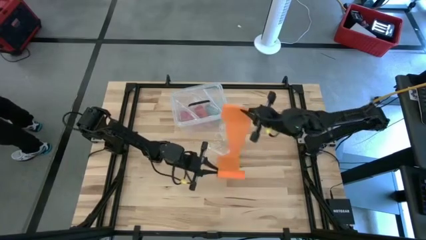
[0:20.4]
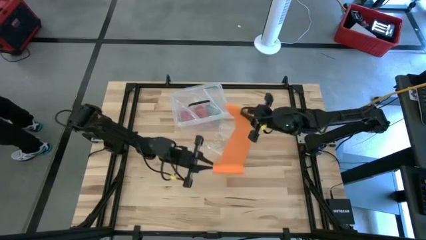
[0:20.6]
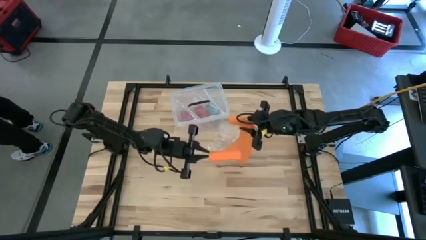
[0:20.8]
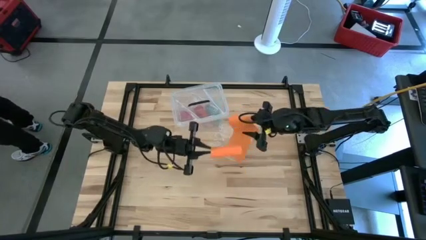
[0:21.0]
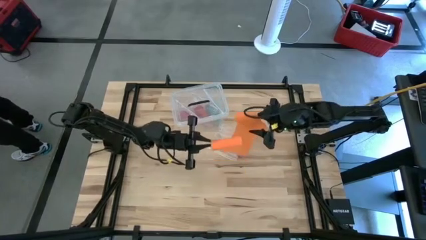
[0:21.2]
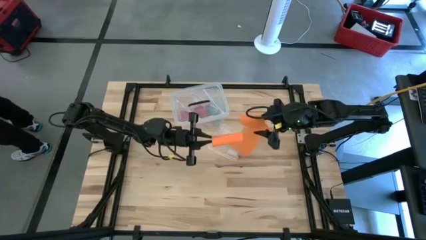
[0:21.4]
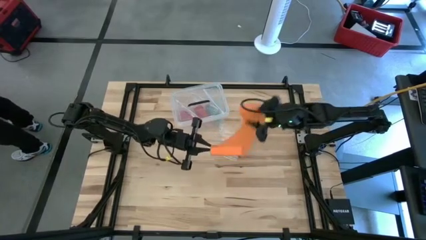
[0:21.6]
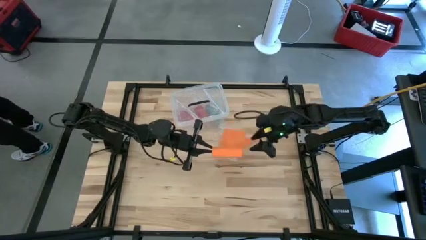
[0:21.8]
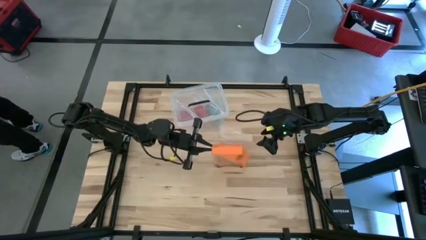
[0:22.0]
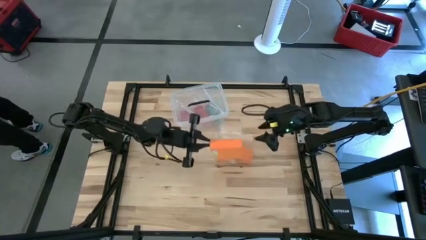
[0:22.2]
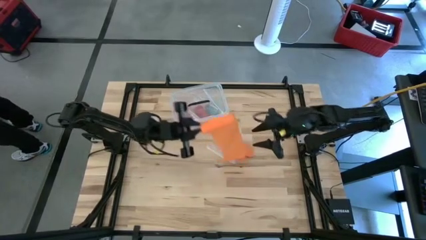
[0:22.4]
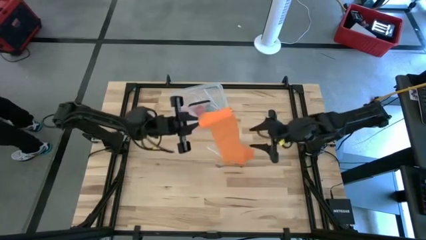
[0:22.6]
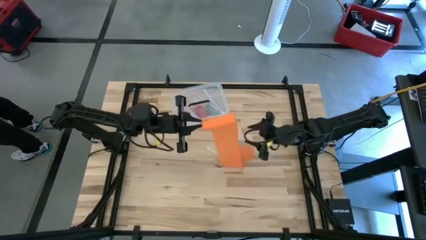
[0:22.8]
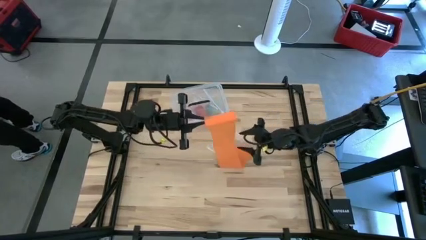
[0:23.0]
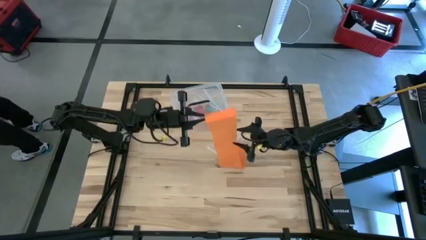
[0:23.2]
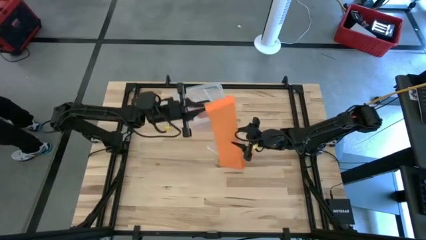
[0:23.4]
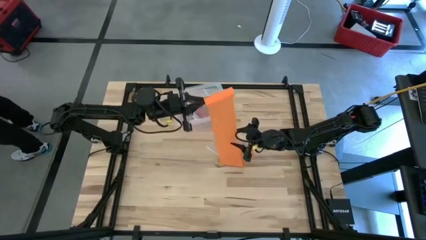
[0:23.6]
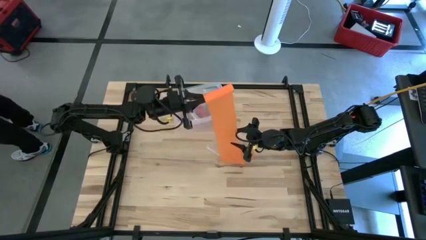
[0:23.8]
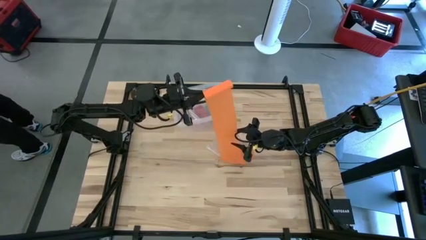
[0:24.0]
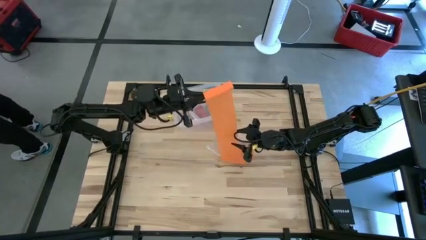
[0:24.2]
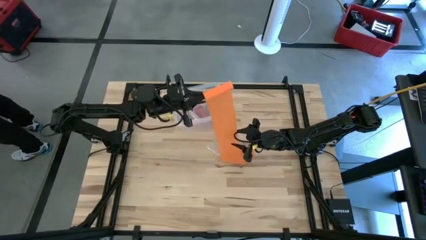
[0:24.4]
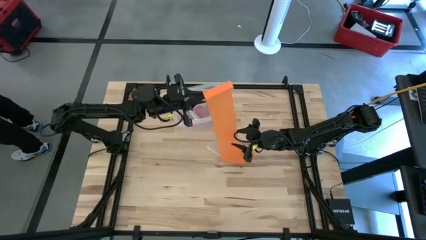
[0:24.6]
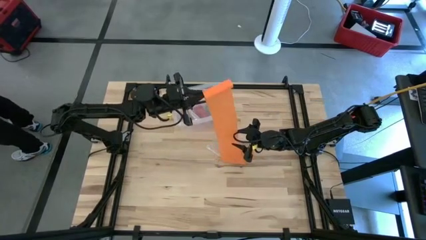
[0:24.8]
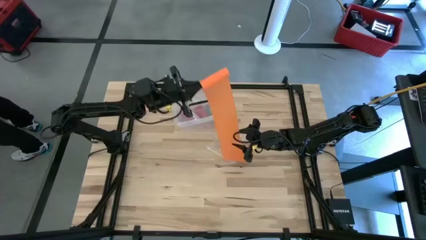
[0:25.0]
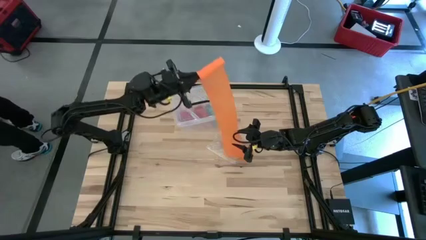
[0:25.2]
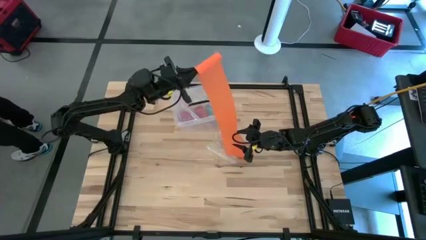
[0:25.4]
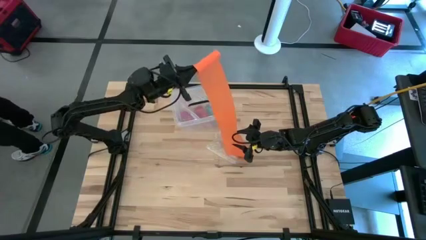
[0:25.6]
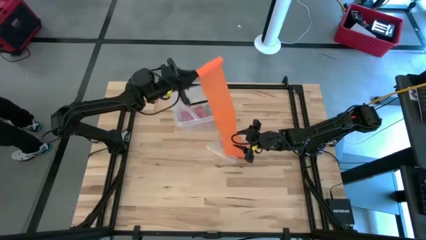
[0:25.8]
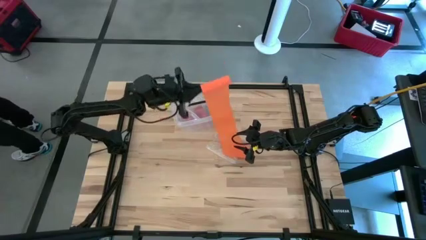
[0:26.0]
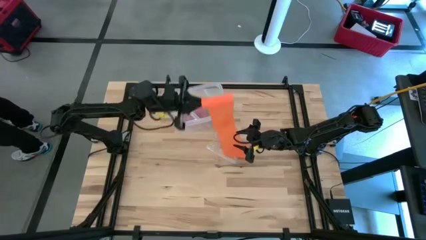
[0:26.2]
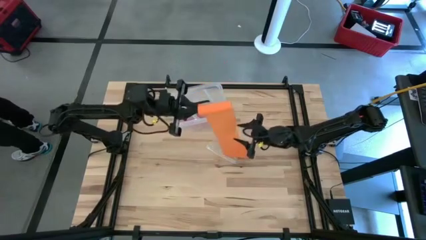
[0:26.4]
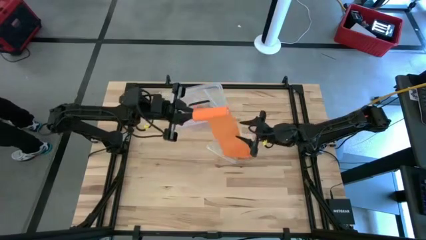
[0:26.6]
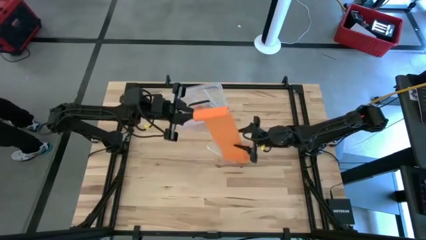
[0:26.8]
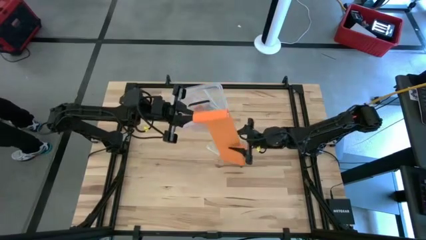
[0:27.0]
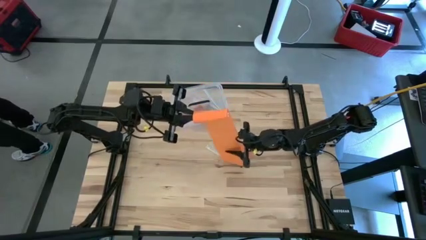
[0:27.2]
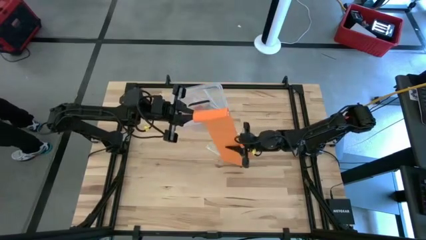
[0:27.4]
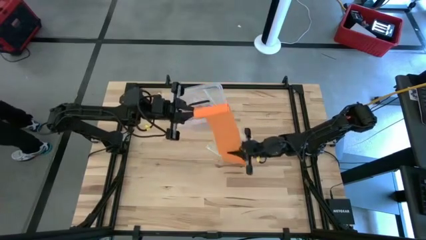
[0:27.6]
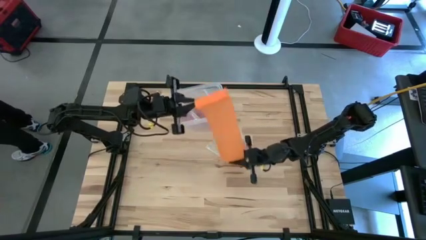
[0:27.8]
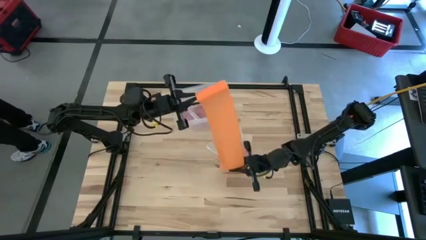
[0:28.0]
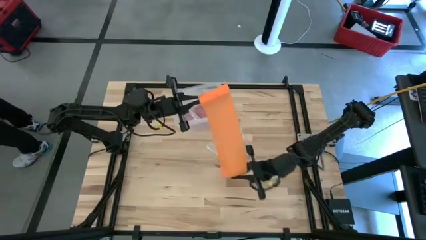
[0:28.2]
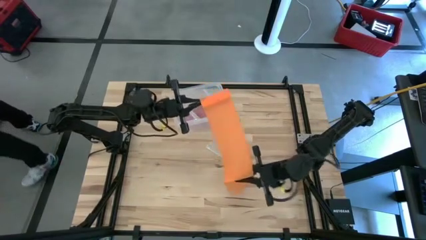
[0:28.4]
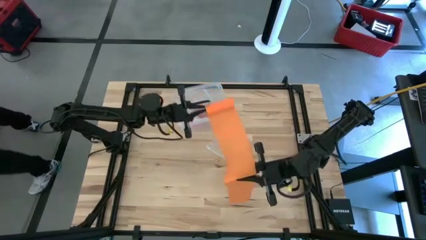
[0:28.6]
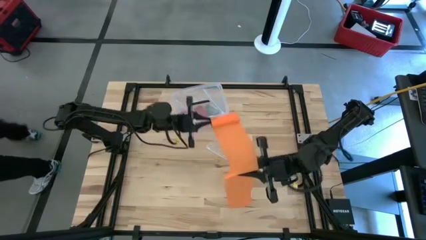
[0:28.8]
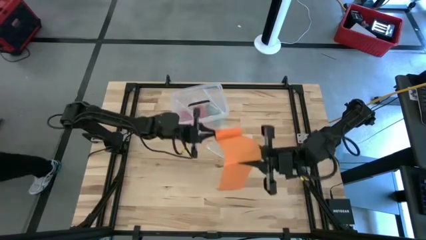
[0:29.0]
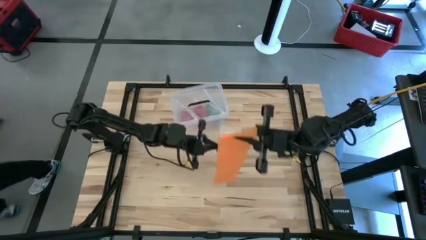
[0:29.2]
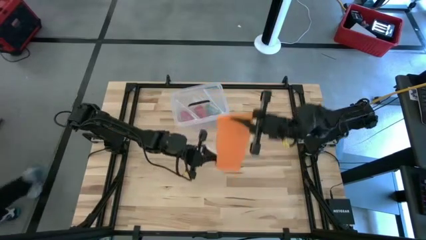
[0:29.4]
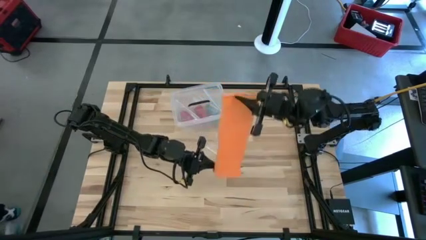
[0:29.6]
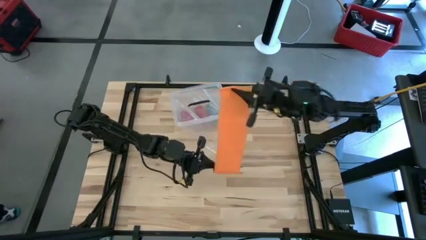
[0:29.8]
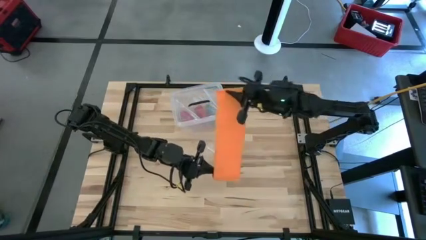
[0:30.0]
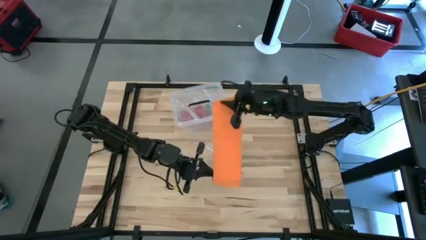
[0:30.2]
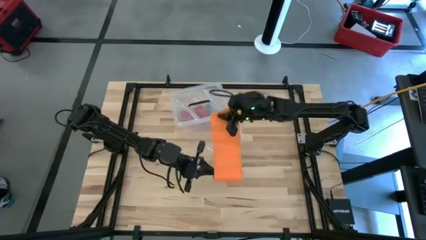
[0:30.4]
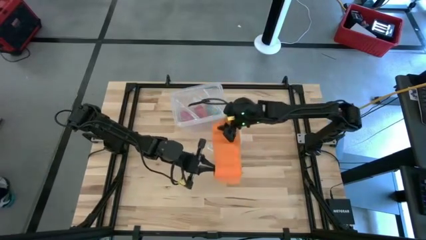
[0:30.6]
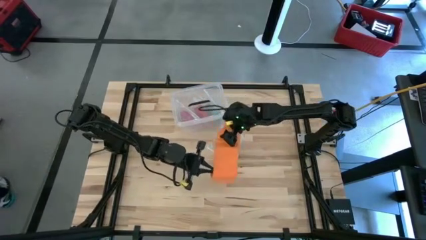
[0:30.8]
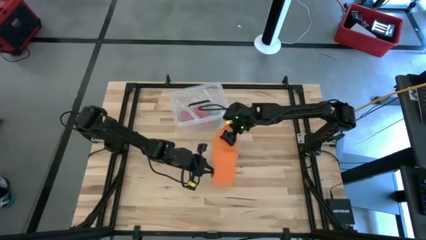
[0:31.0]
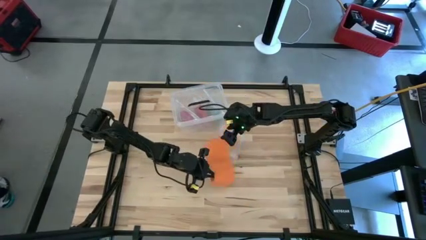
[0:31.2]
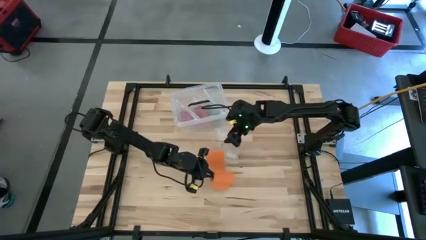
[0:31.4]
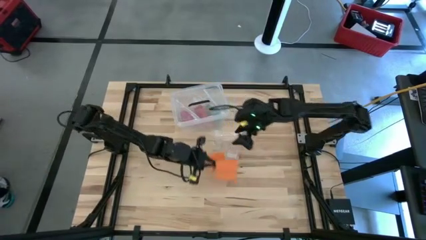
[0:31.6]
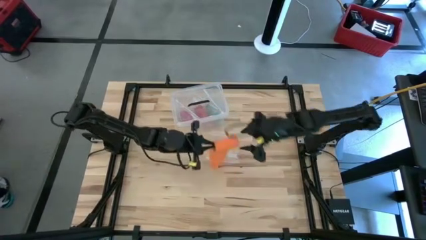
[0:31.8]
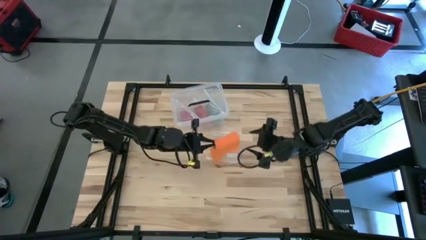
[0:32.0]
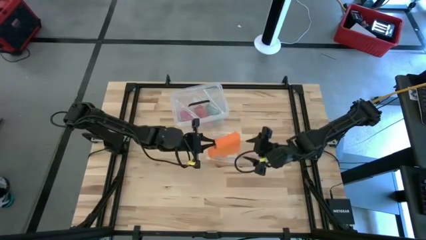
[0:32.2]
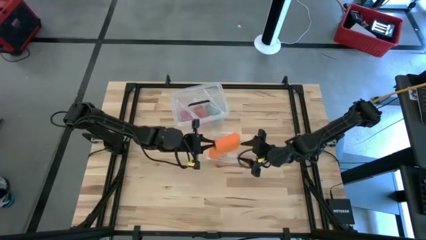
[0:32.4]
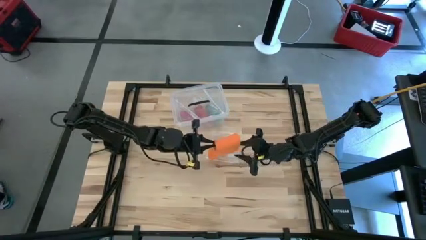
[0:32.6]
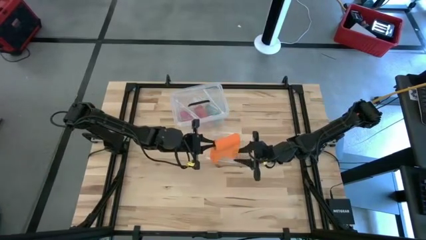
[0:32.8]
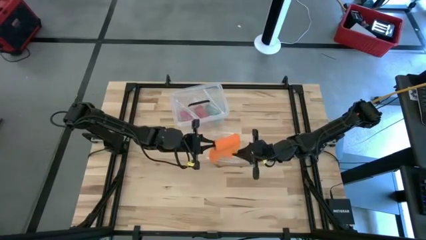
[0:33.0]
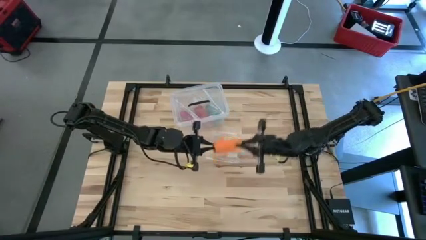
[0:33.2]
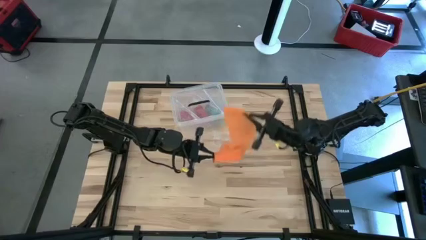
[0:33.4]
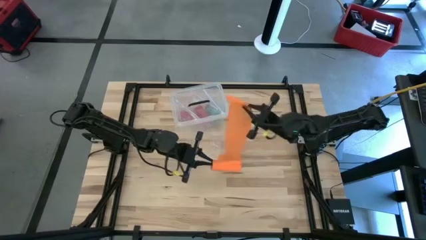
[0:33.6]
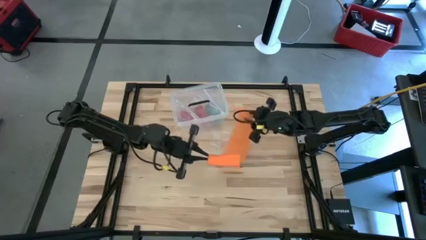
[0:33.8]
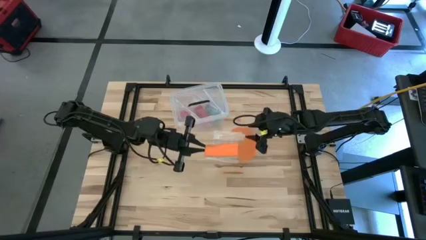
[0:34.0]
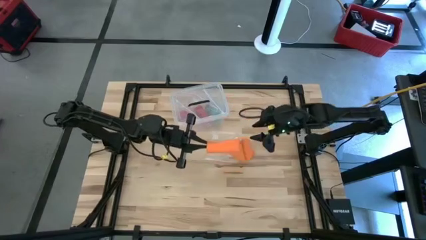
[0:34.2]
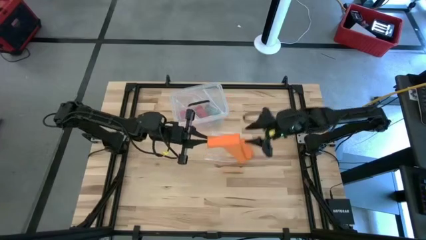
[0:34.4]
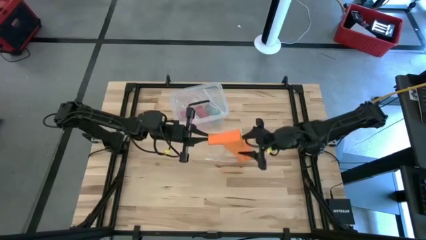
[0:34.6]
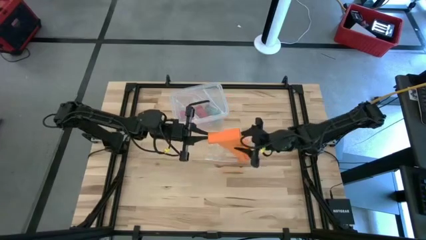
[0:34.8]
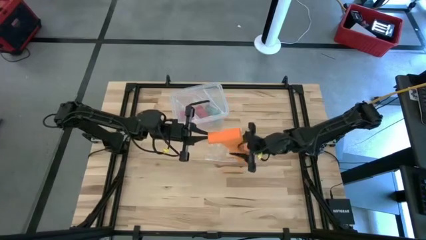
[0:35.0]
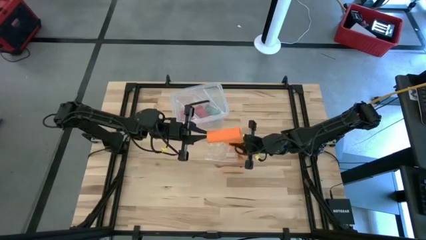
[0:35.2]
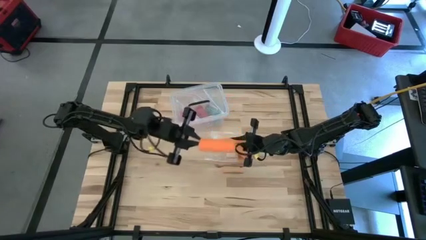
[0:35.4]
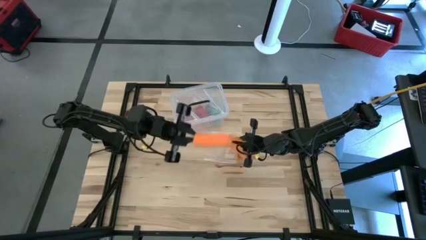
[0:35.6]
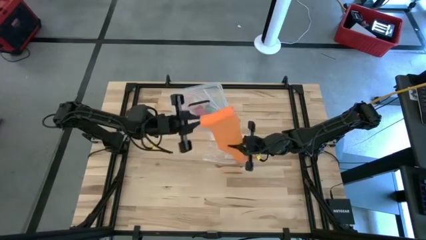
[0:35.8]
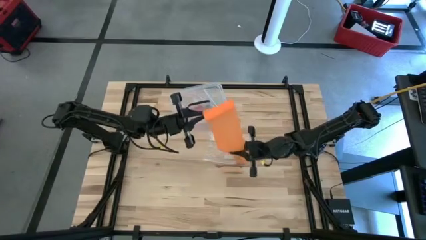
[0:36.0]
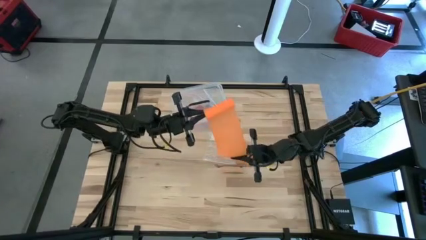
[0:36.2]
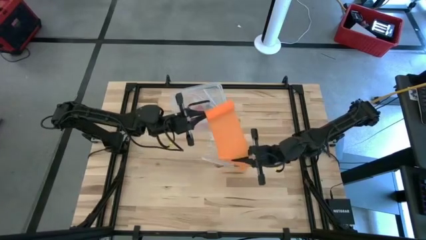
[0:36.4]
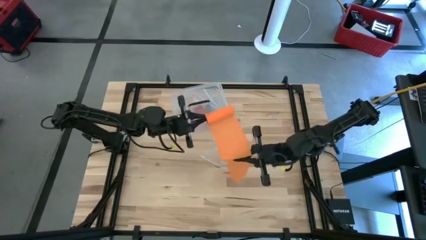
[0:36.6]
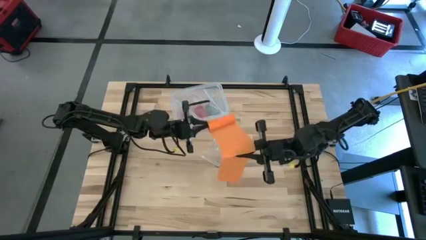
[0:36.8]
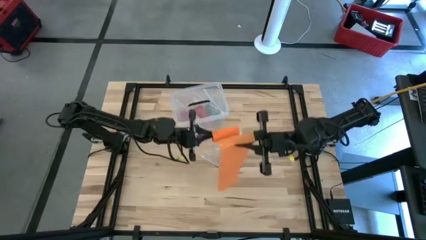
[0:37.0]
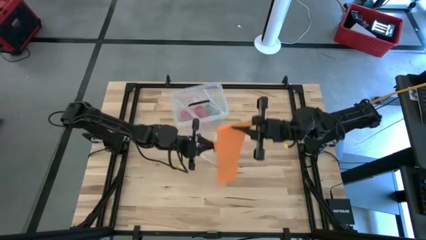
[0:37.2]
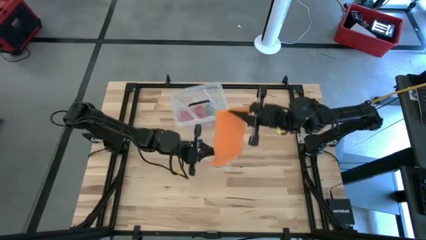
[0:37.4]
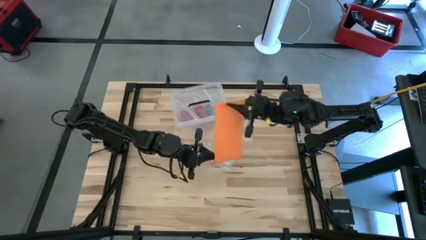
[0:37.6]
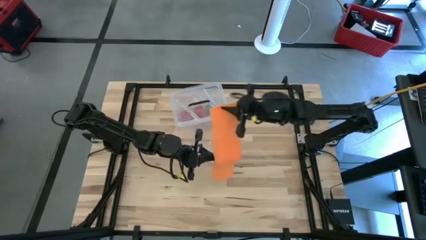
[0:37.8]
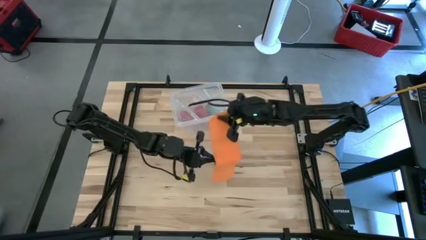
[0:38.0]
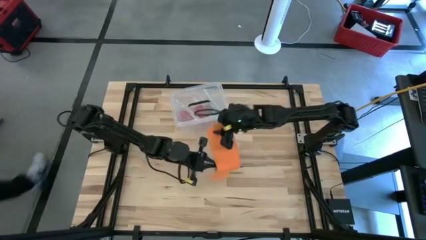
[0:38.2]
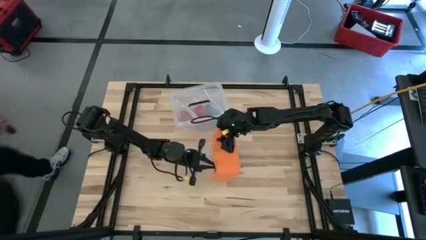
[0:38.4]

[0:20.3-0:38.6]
Task: Roll bandage
Roll the orange bandage
